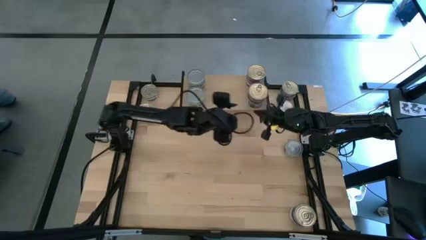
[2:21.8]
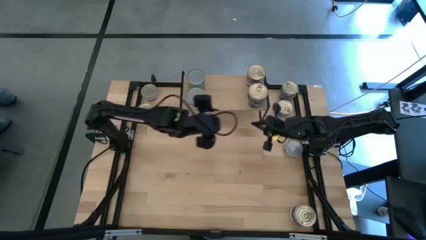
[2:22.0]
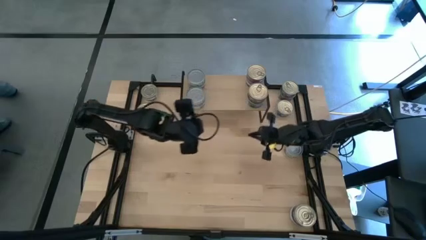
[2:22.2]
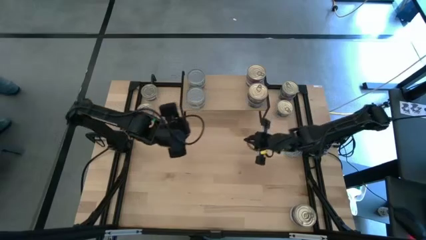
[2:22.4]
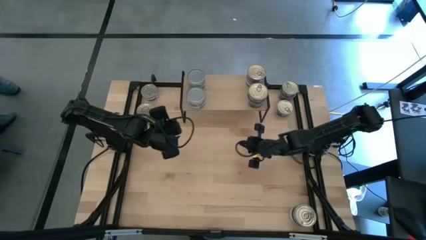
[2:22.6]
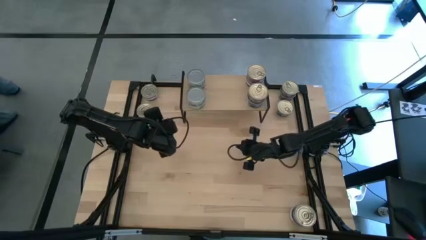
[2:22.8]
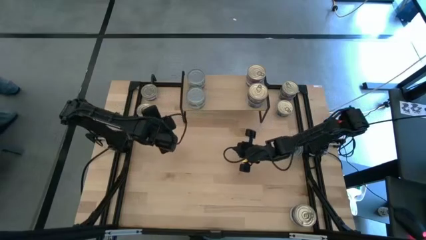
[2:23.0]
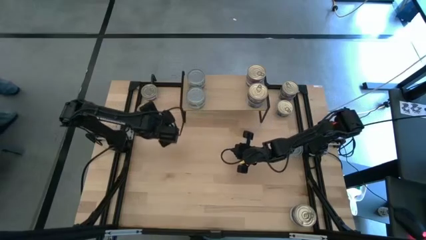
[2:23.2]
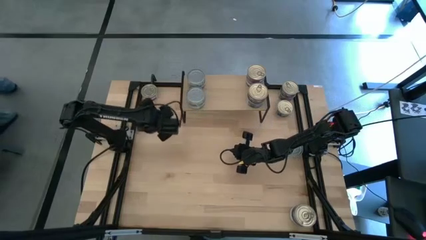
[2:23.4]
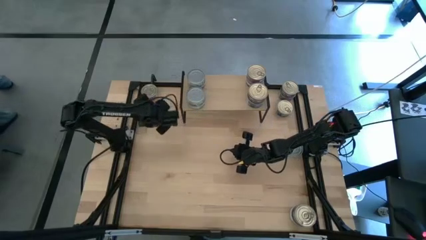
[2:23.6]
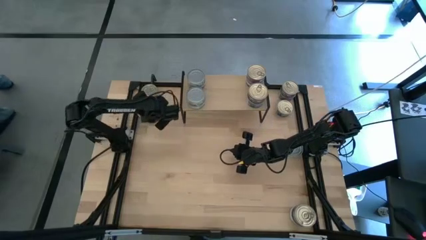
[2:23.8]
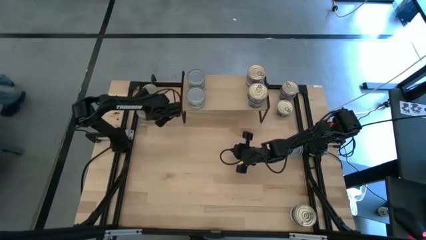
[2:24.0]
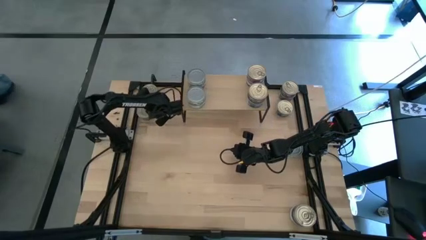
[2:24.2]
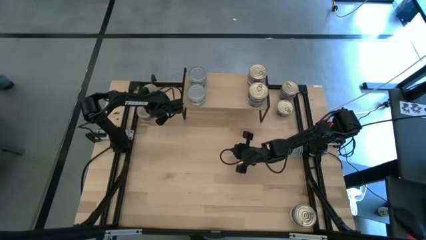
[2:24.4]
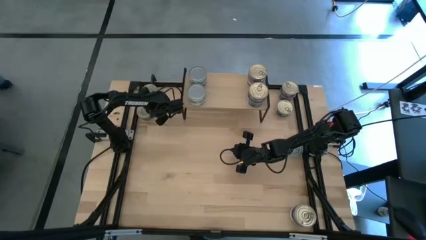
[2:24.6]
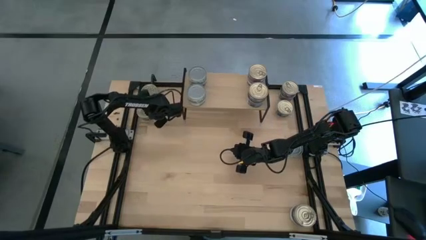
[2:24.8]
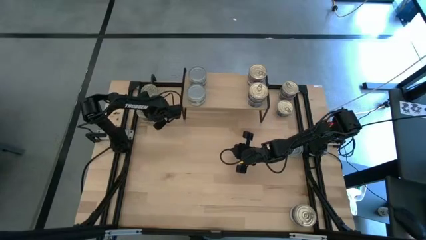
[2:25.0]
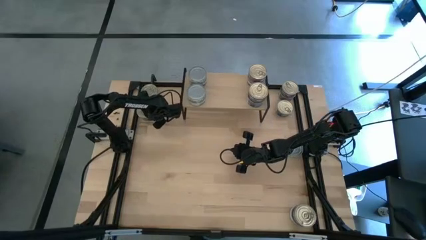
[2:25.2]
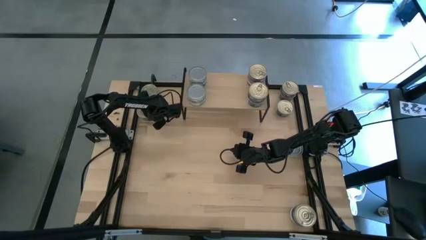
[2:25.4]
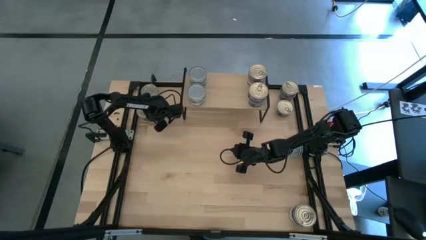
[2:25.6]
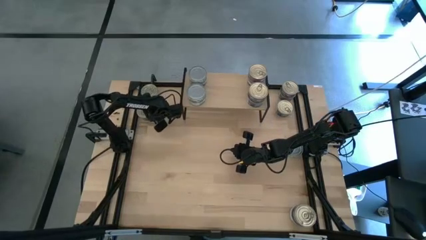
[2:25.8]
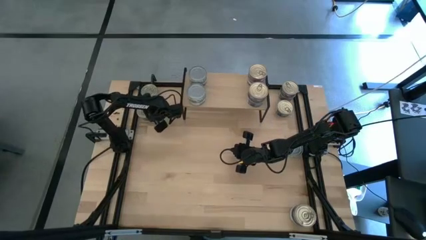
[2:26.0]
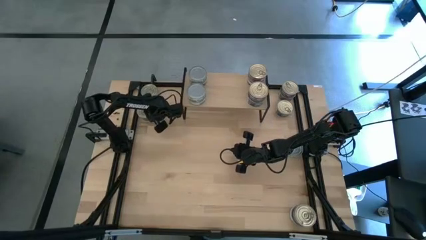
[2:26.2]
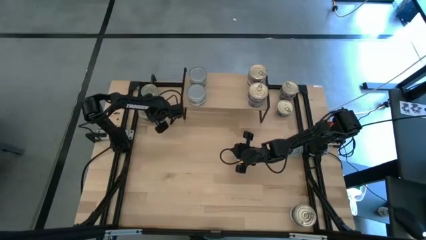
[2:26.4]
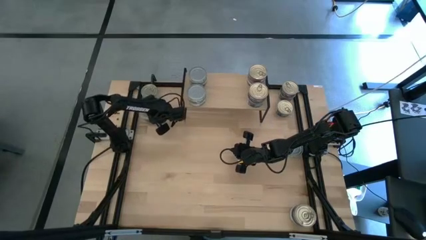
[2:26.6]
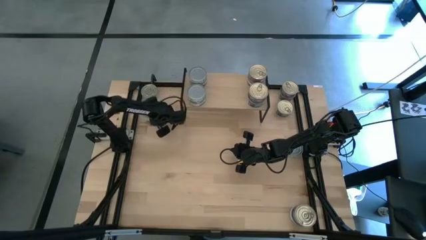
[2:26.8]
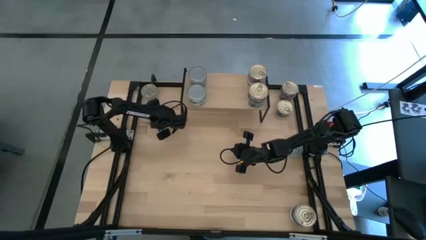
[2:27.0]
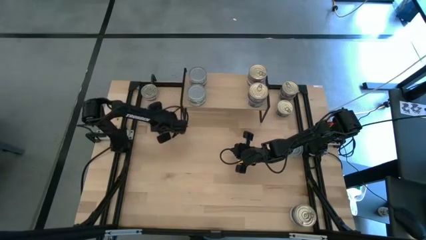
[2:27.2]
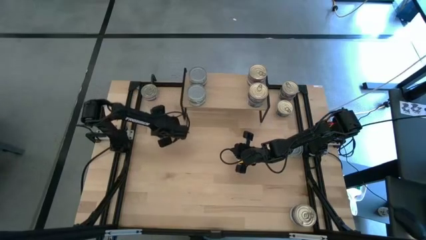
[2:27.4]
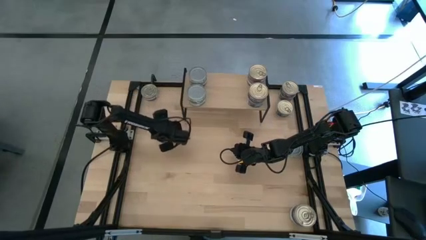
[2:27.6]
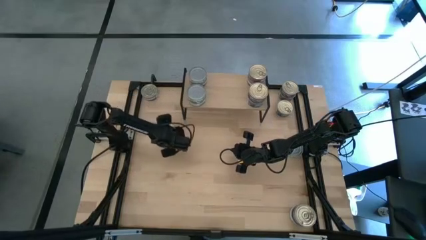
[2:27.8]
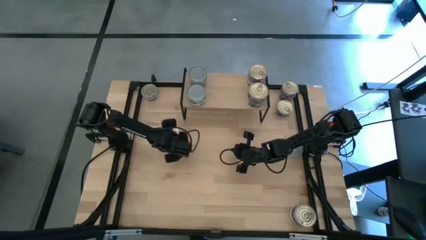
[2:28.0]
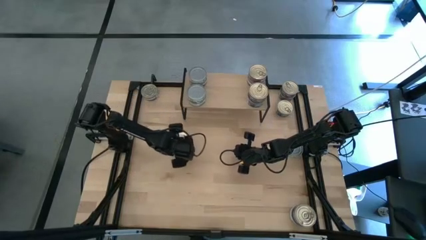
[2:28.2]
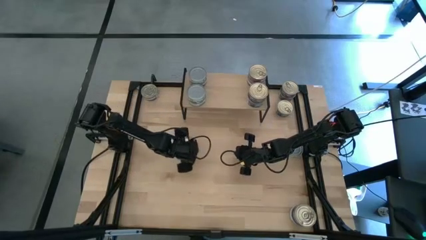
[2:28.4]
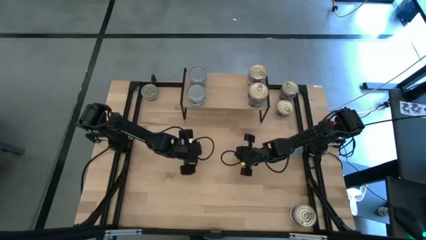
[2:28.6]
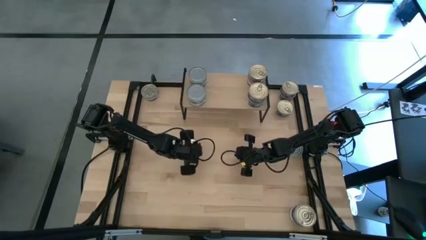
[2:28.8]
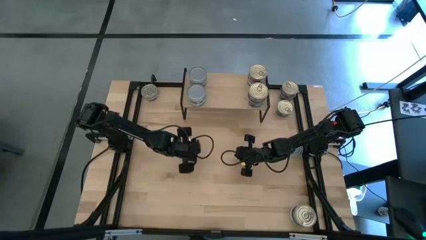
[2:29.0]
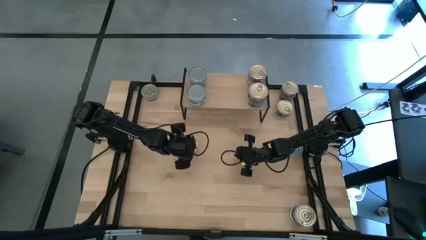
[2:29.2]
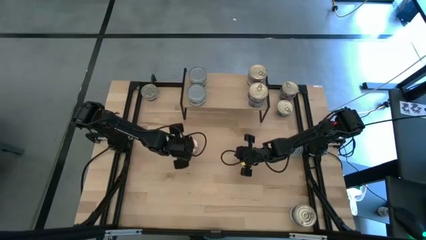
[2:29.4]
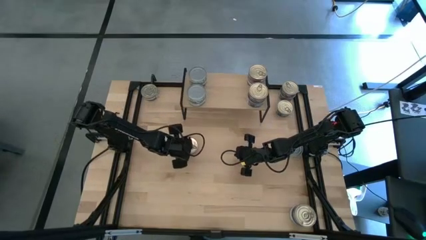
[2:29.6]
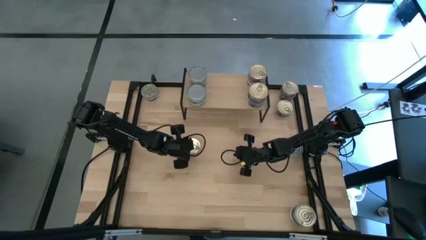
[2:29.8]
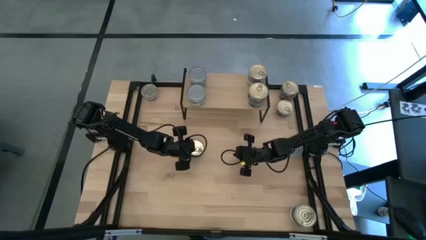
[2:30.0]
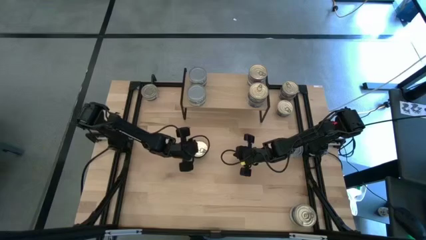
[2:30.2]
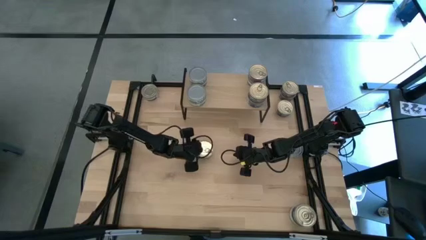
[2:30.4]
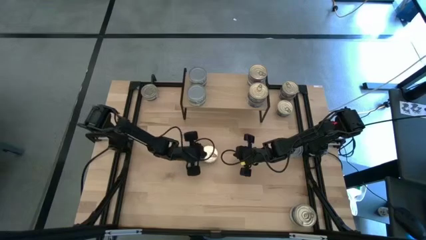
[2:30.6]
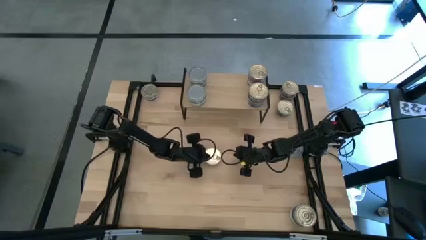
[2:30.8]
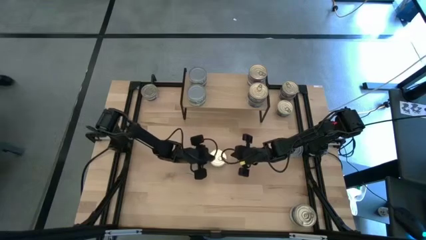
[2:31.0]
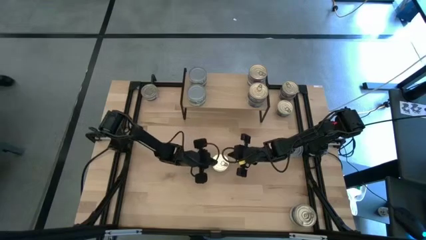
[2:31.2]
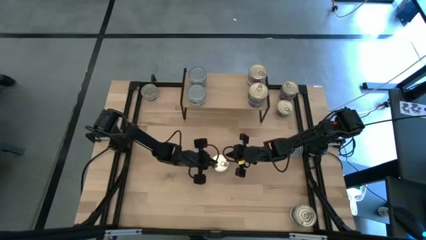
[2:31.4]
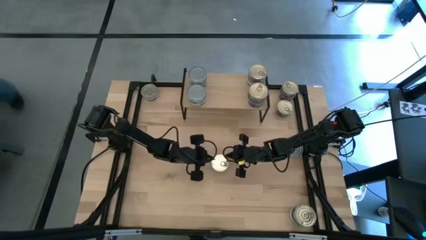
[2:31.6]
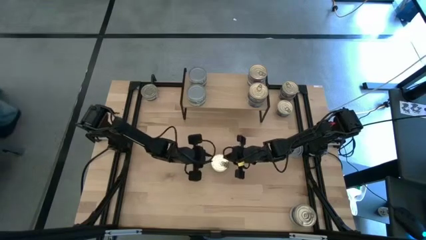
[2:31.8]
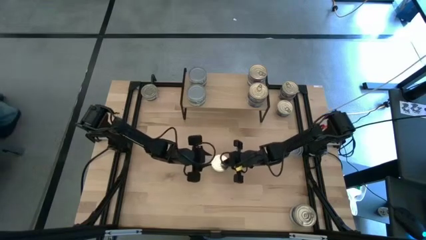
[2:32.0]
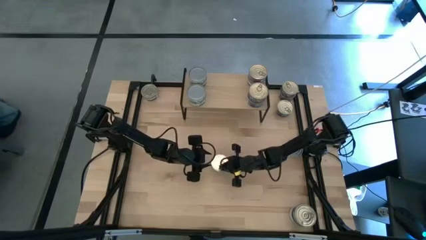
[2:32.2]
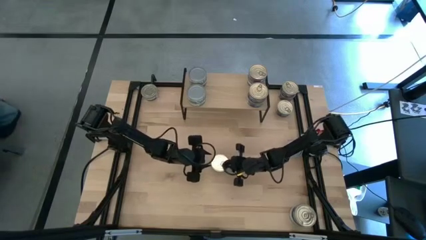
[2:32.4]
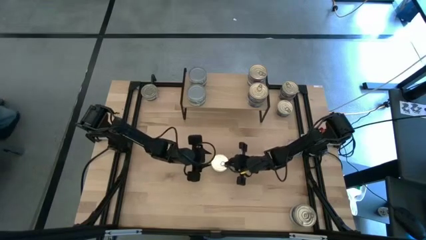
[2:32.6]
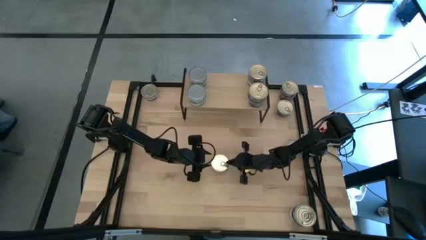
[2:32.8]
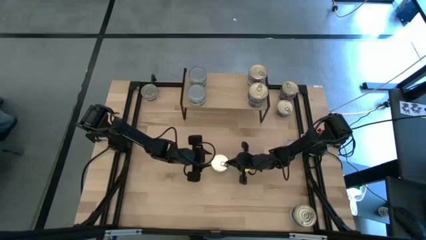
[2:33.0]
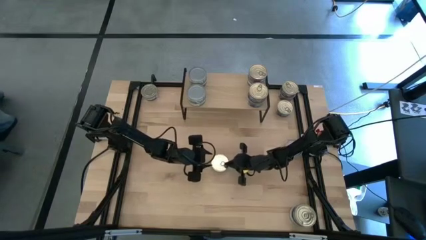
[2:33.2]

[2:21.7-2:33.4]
Task: Stack canned seafood by type on shelf
Put the blue pink tuna can on the shelf aligned with the other blue pink tuna can

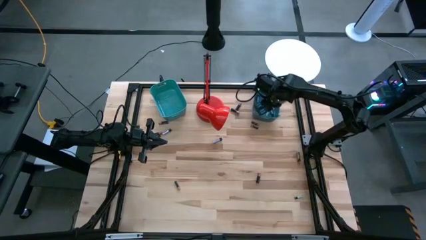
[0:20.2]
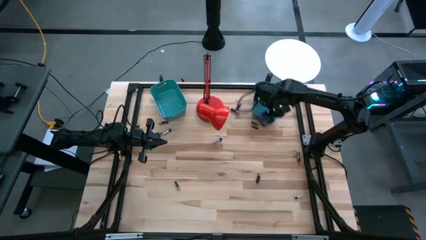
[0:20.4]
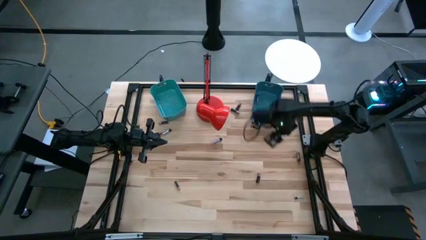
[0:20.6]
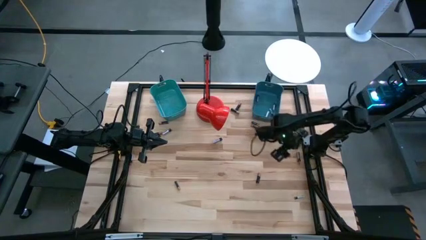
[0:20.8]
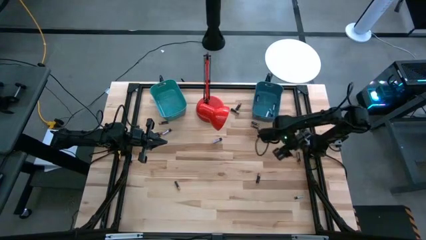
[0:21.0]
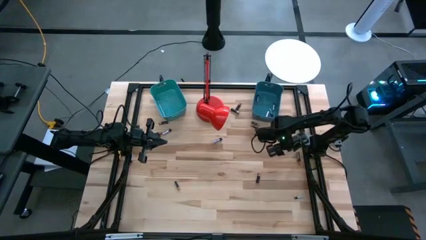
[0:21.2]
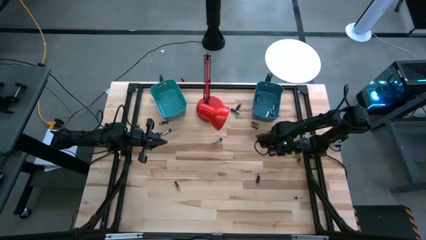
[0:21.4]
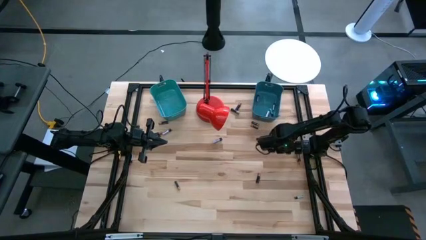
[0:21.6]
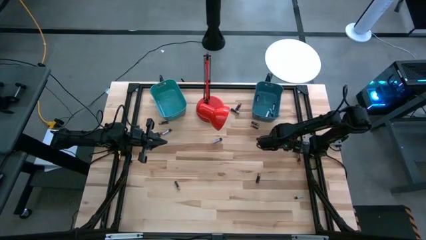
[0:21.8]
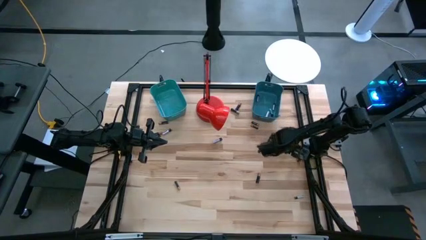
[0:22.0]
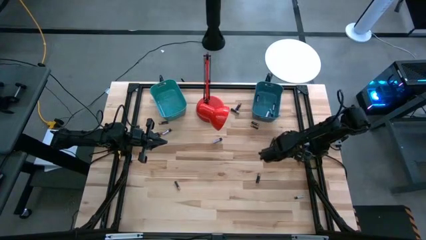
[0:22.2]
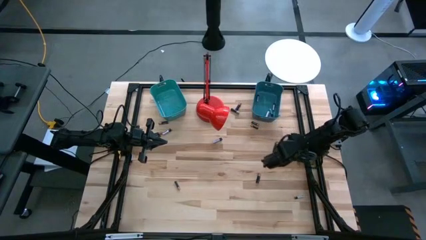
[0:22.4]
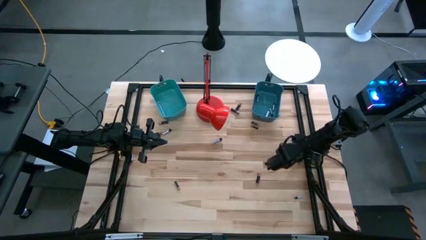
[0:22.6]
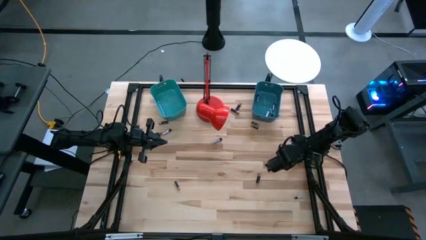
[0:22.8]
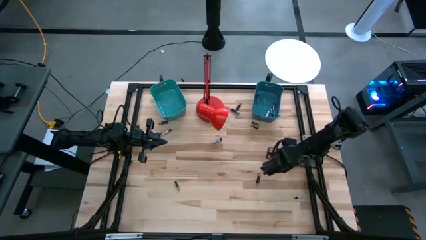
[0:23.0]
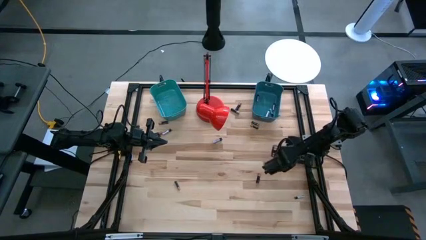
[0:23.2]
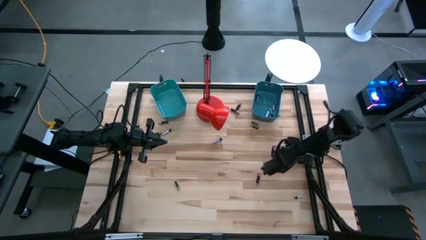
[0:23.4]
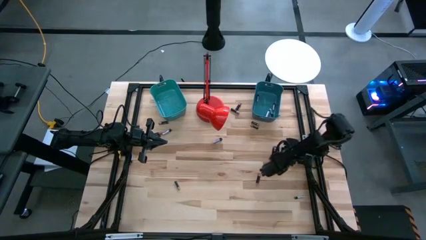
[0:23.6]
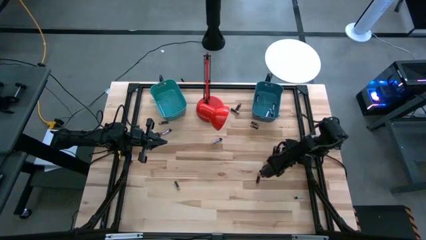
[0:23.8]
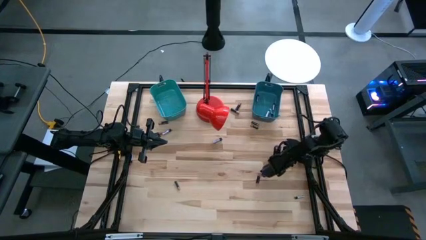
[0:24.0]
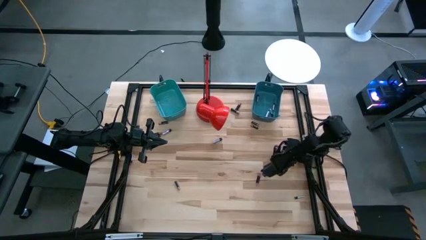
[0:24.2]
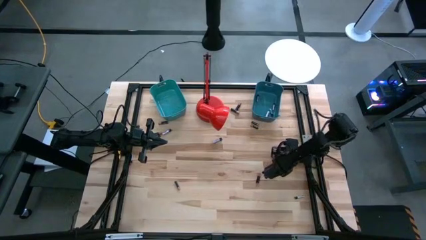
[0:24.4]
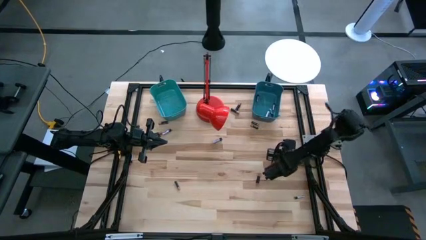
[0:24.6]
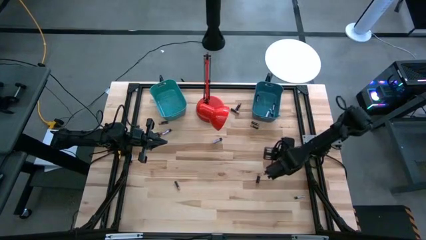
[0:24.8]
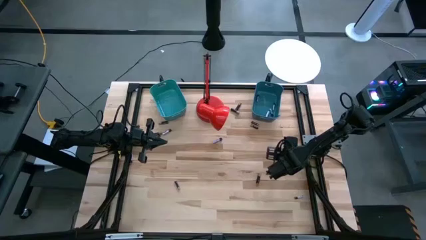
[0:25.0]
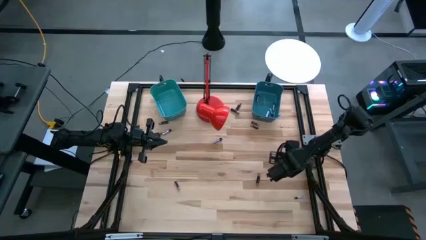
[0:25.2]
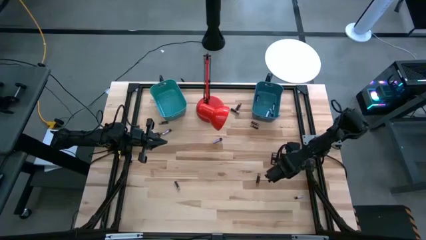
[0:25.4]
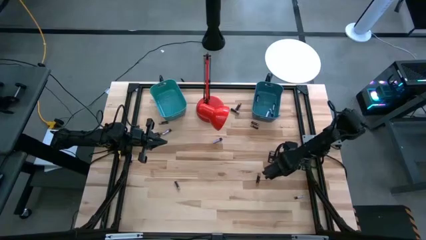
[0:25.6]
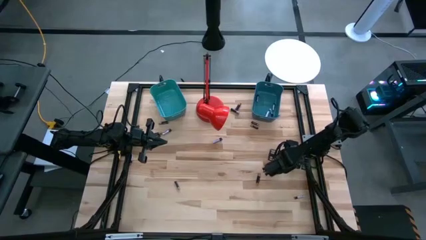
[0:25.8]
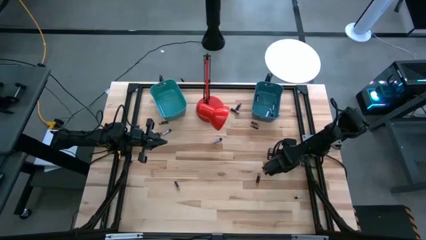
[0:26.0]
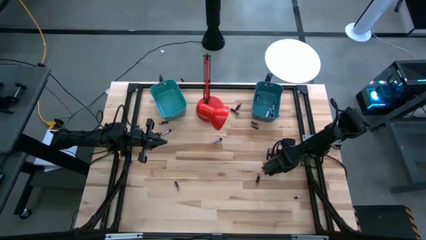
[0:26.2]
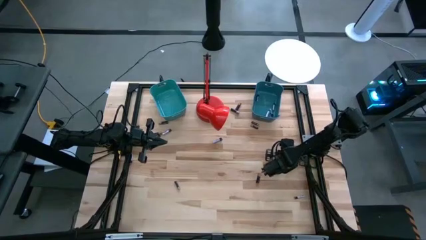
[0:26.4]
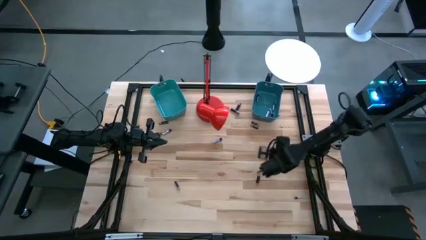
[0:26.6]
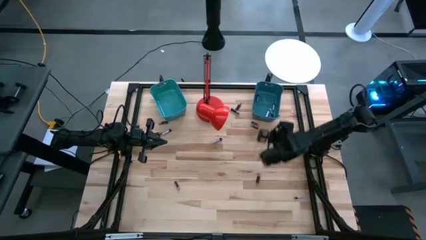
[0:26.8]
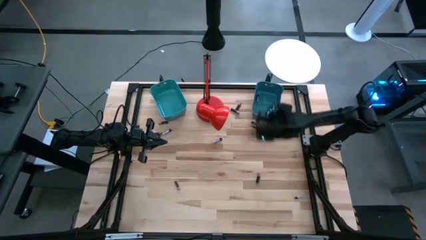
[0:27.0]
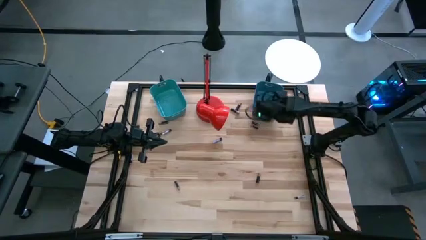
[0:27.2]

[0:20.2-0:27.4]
Task: Sort batteries
Put the silver battery into the blue bin
